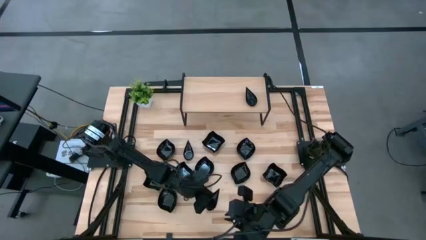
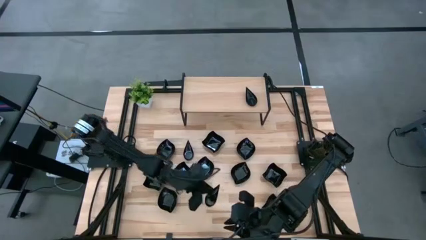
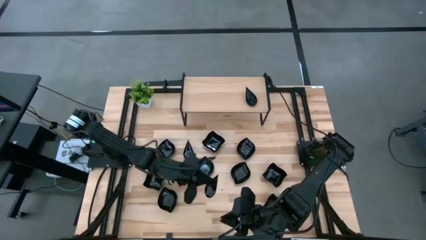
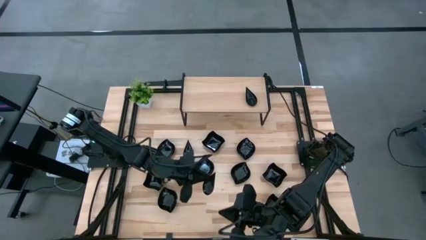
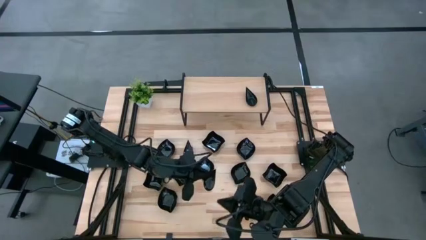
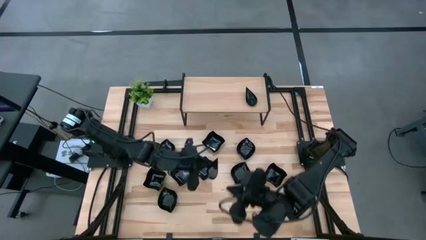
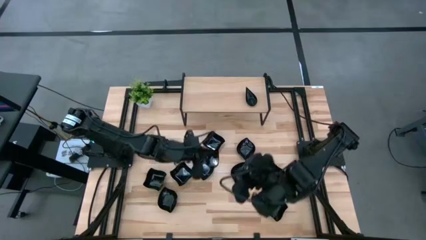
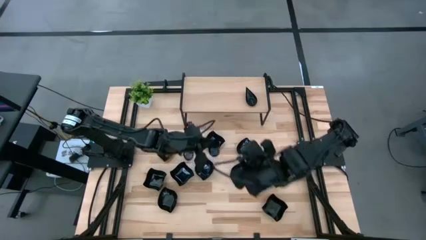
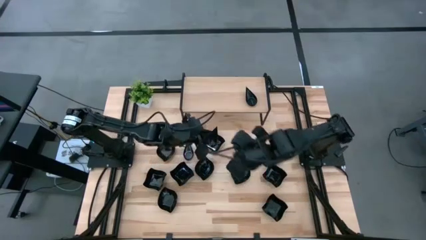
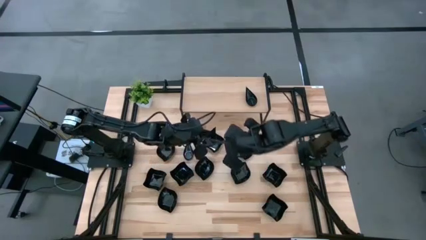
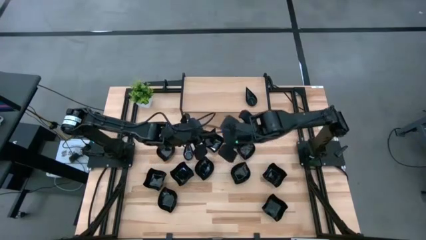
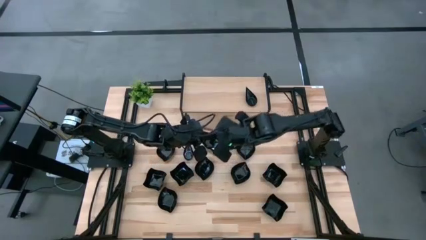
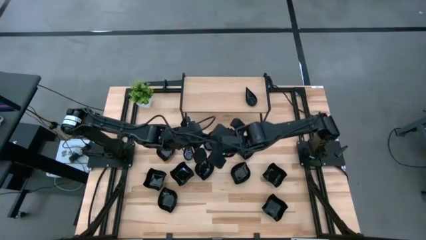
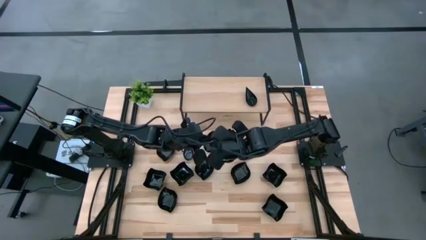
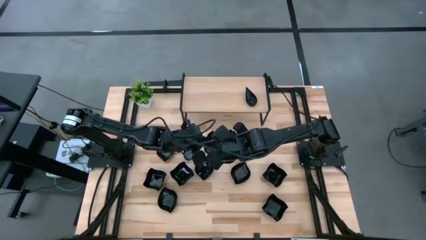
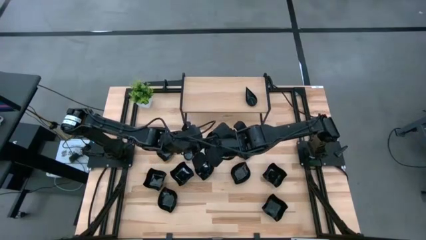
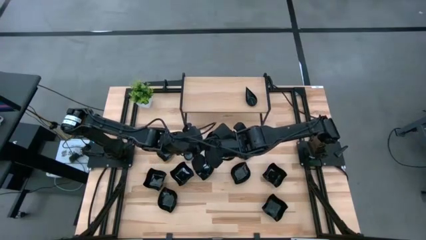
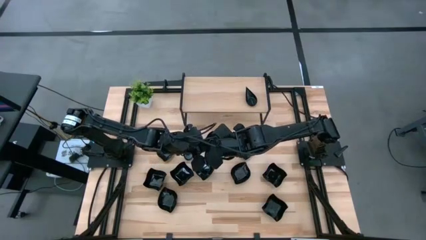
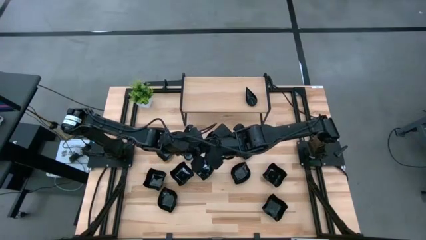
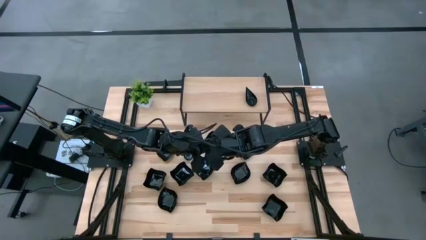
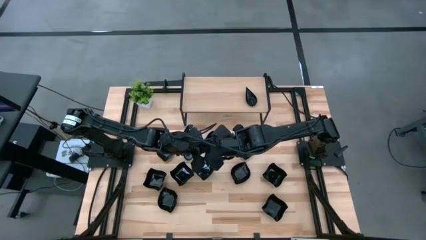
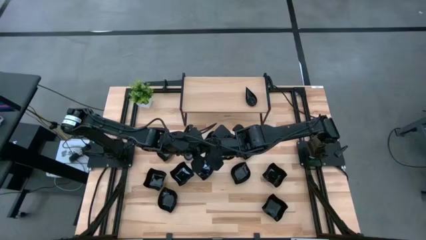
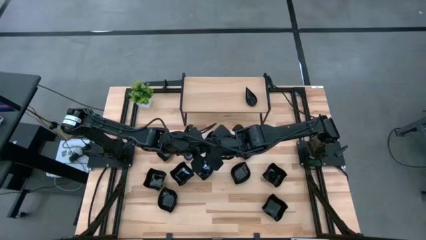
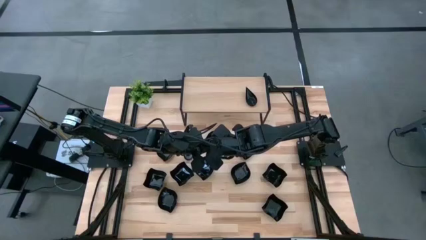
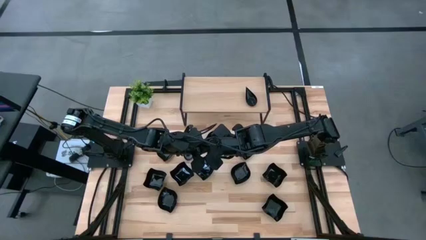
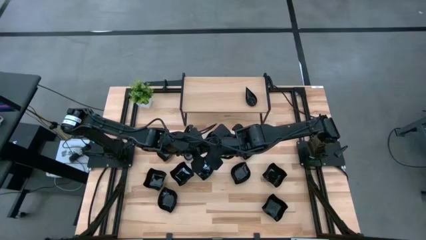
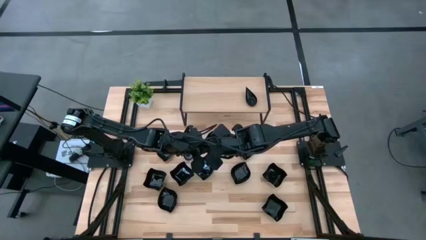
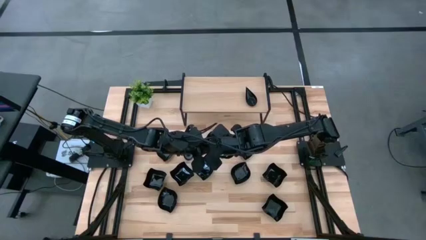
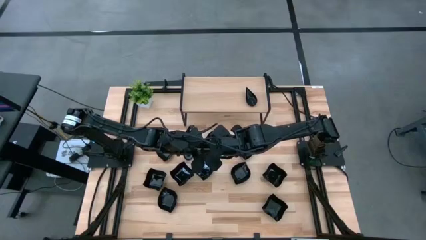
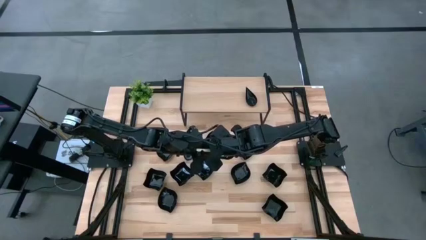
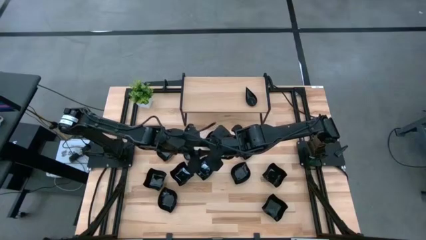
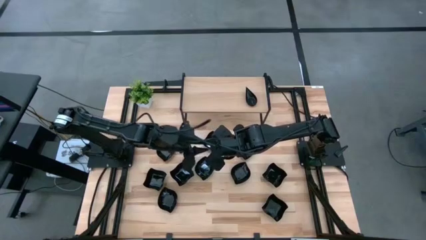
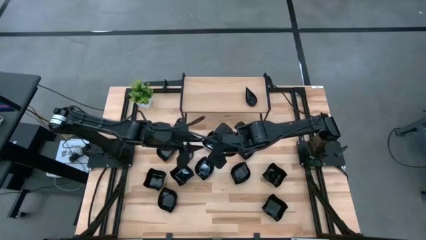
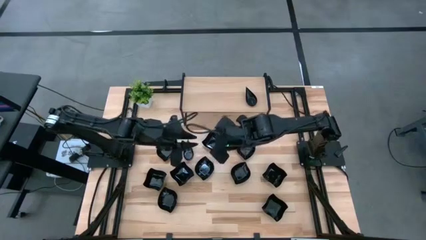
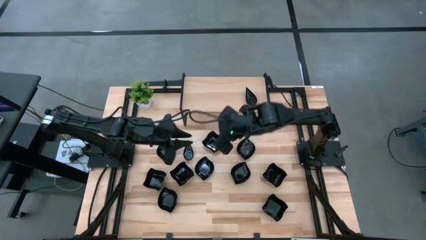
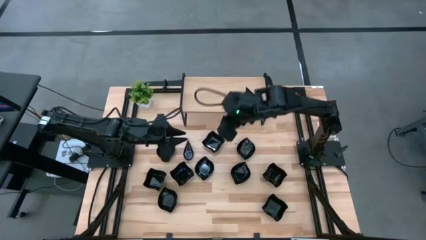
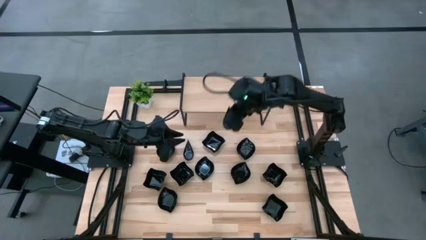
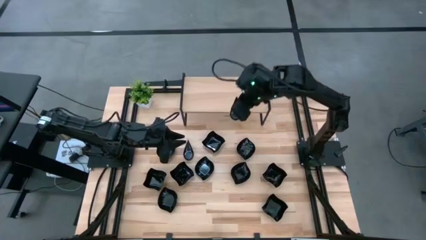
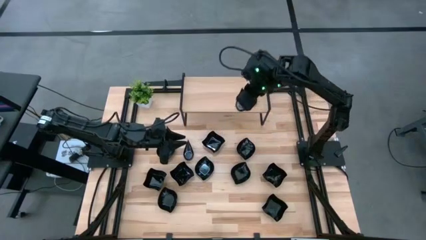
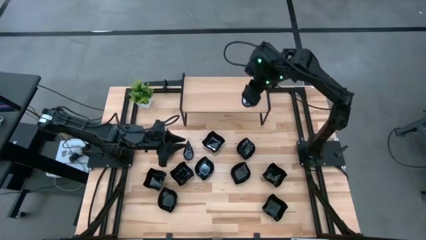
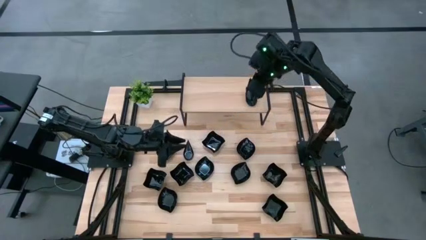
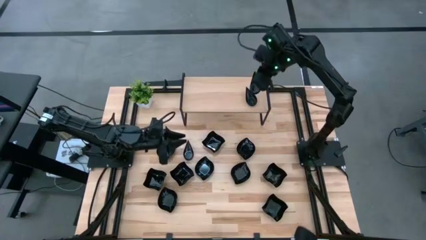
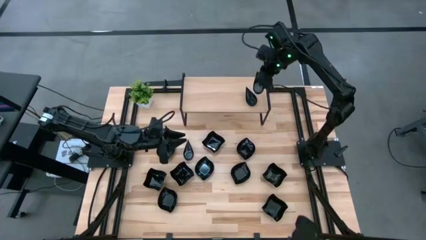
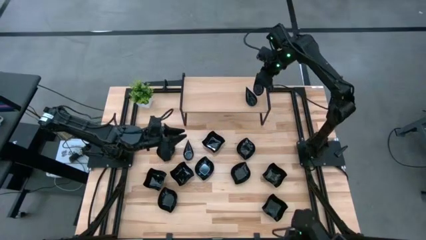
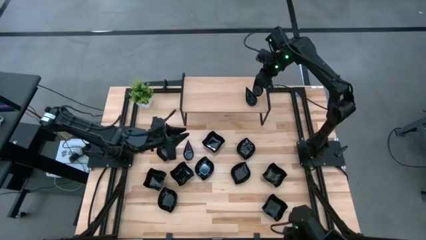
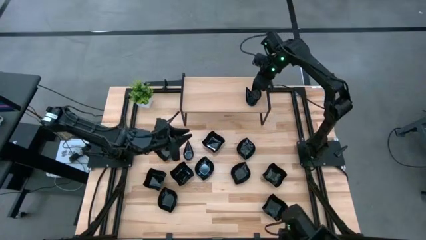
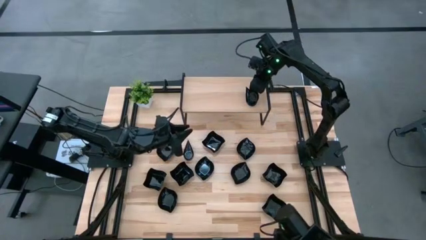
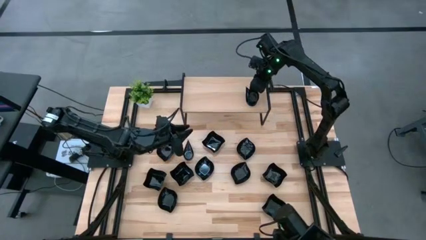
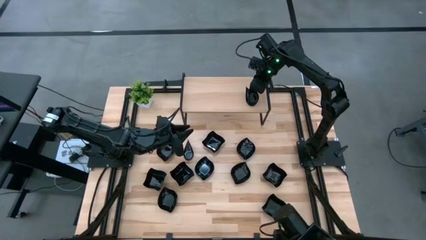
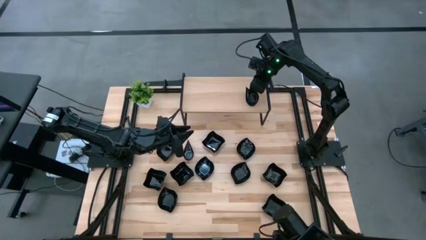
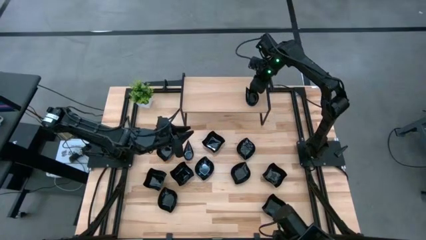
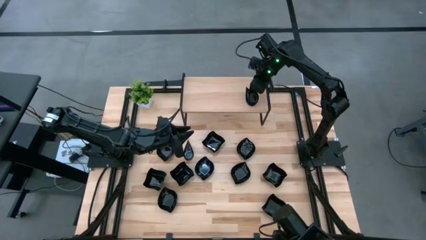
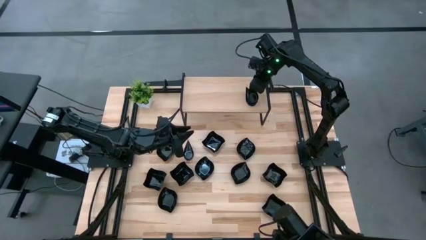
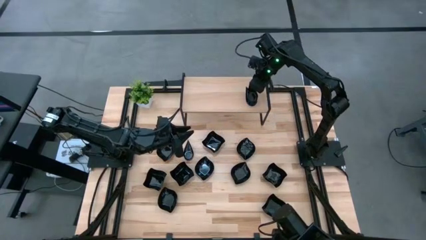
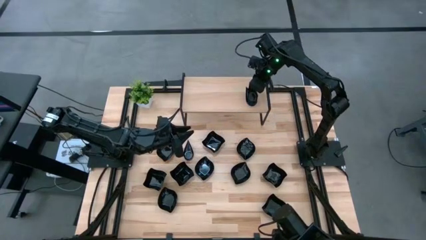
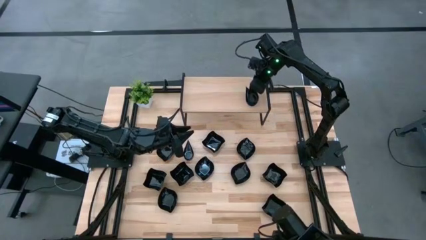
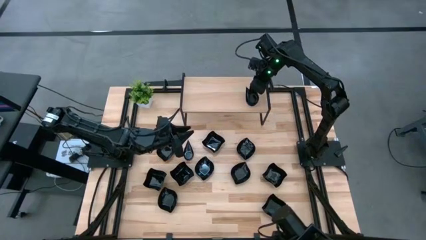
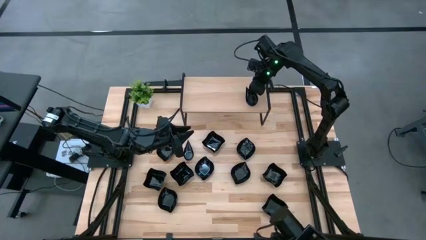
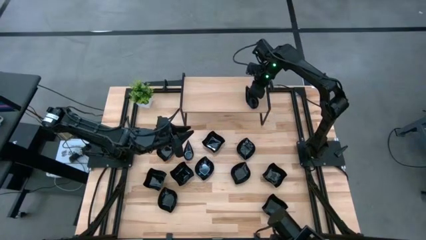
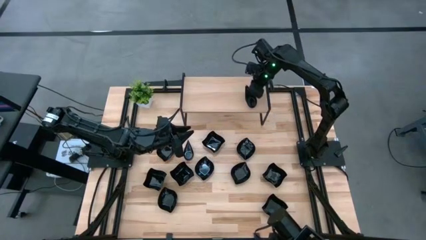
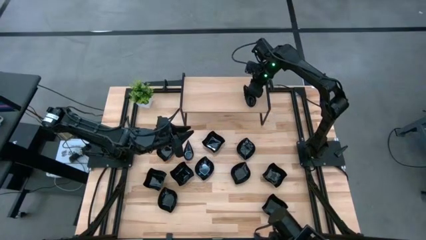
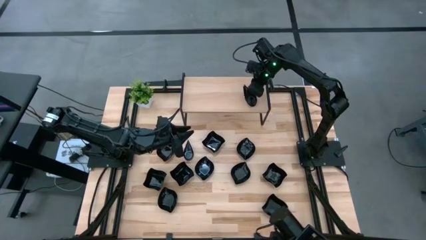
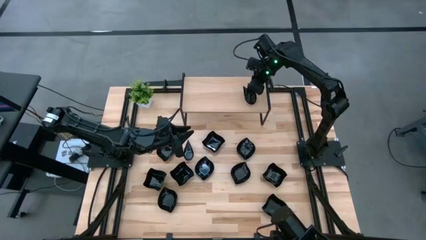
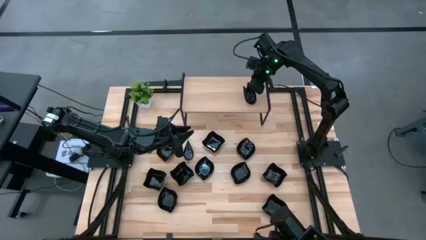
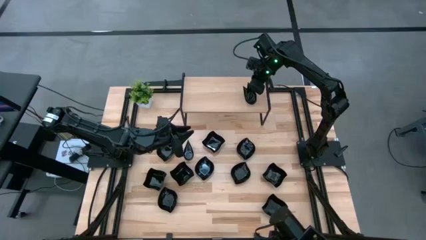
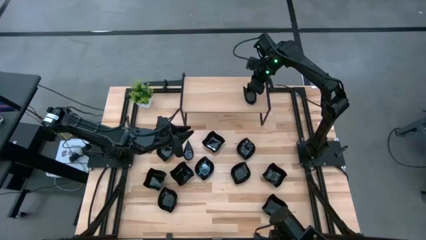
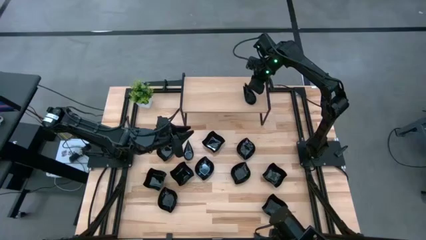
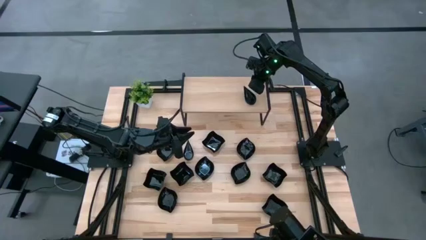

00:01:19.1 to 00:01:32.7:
Task: Pick & Place Mini shaped plates
Stack the black drop shaped plate on top of the black drop shaped plate on the shelf
